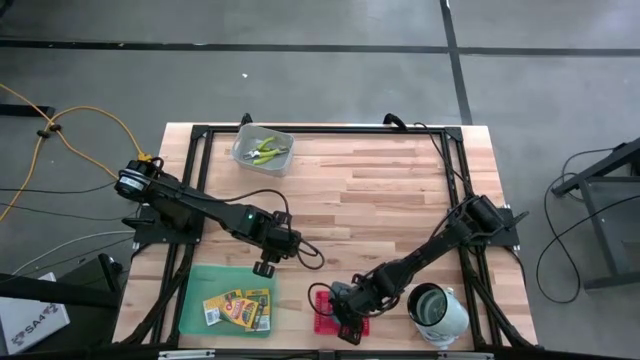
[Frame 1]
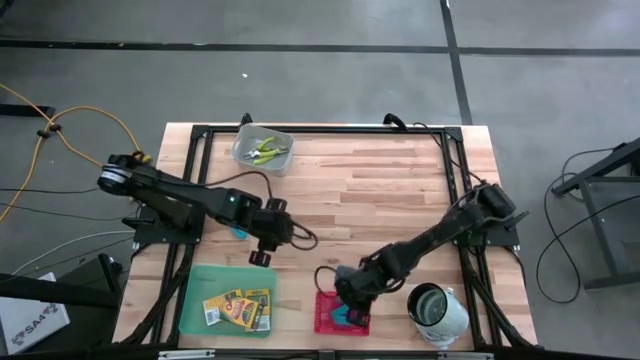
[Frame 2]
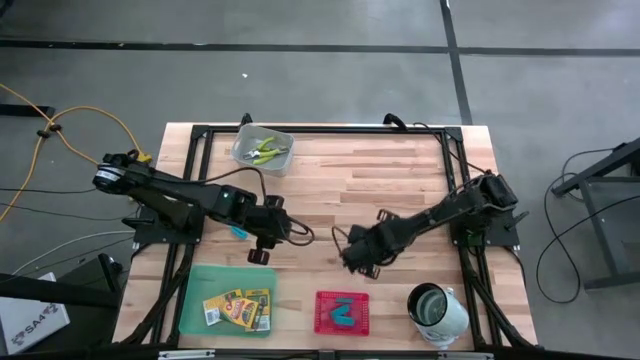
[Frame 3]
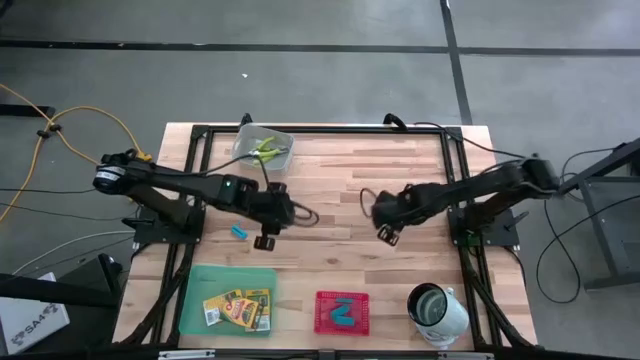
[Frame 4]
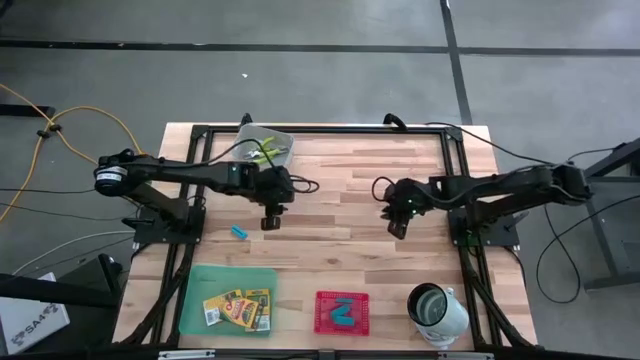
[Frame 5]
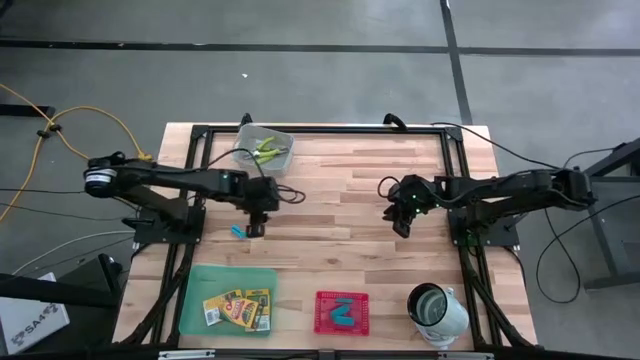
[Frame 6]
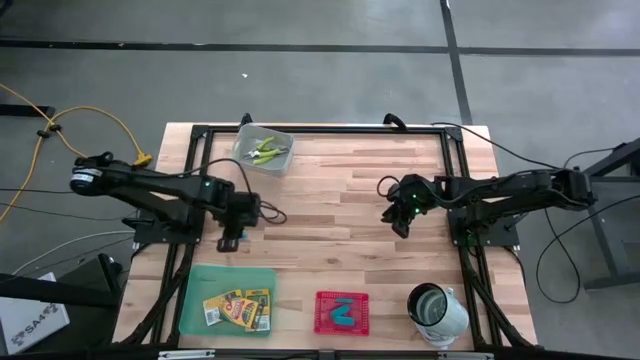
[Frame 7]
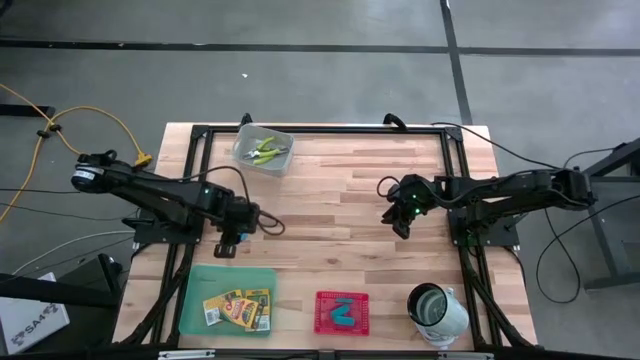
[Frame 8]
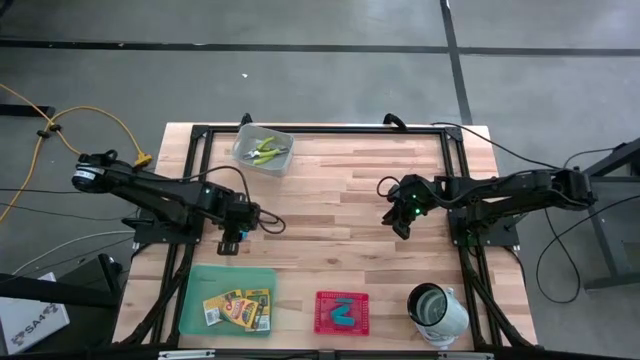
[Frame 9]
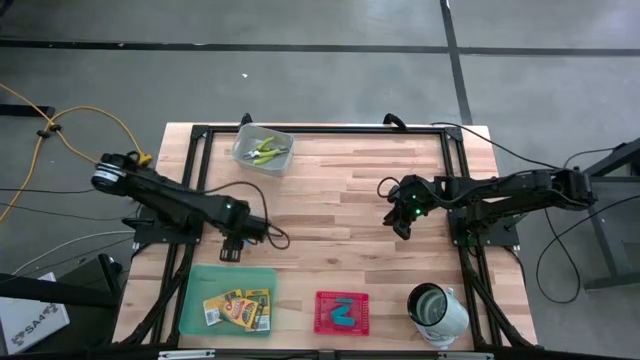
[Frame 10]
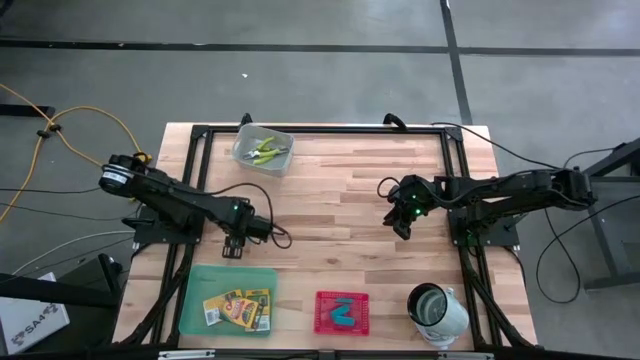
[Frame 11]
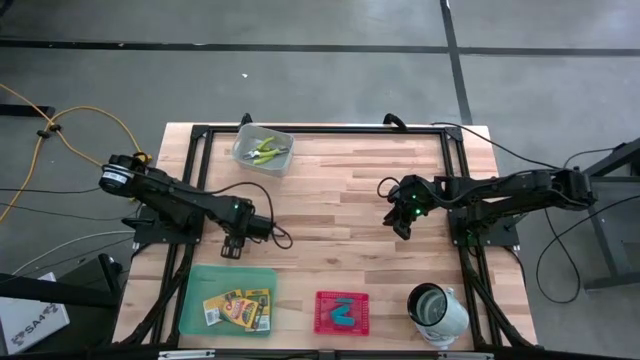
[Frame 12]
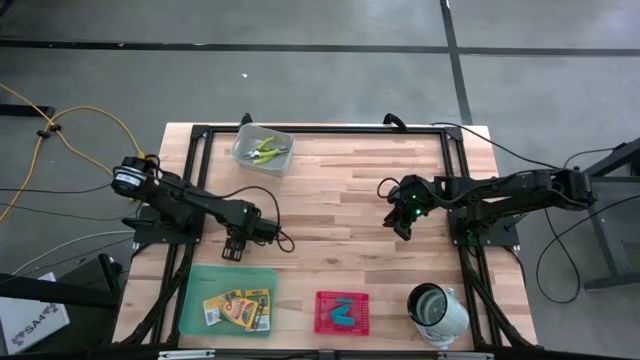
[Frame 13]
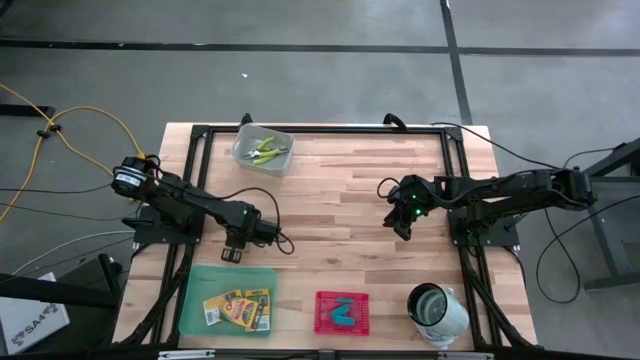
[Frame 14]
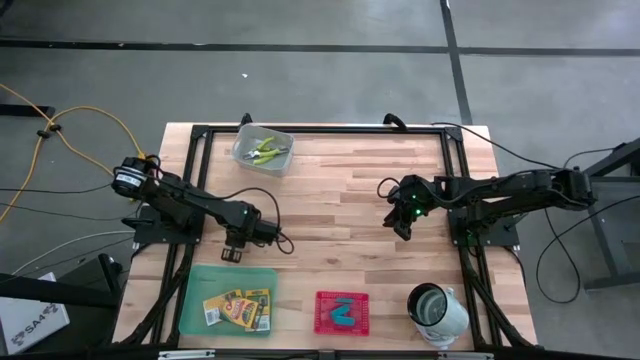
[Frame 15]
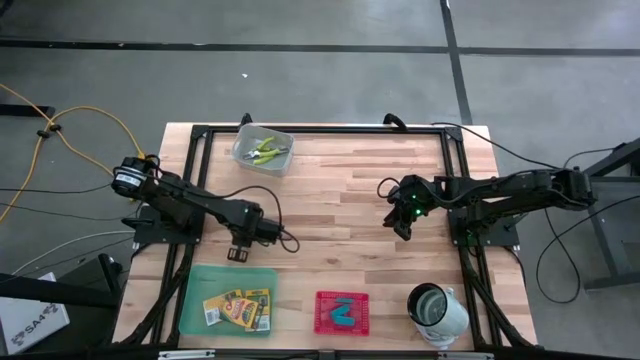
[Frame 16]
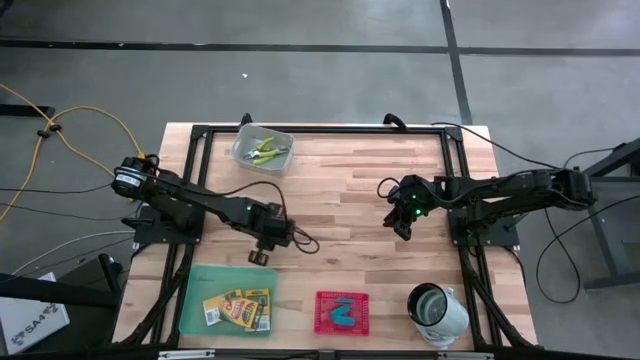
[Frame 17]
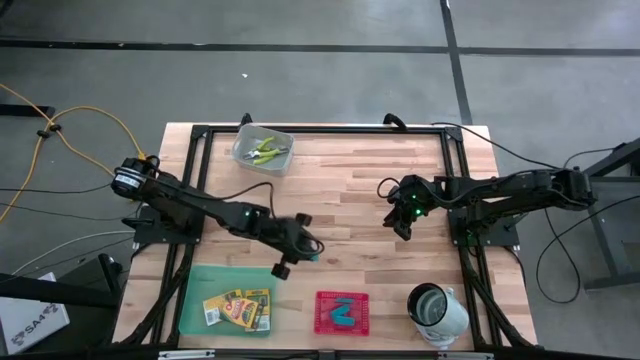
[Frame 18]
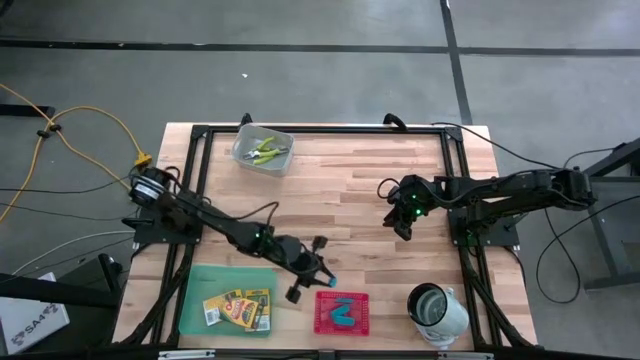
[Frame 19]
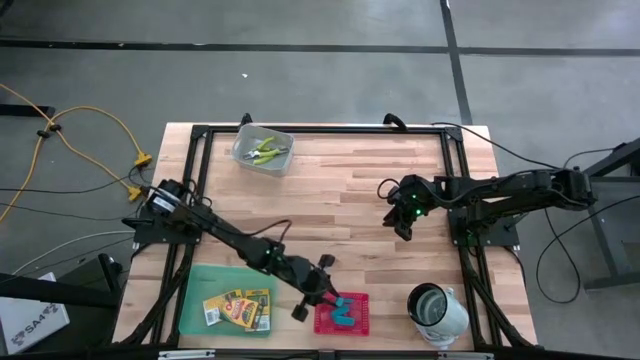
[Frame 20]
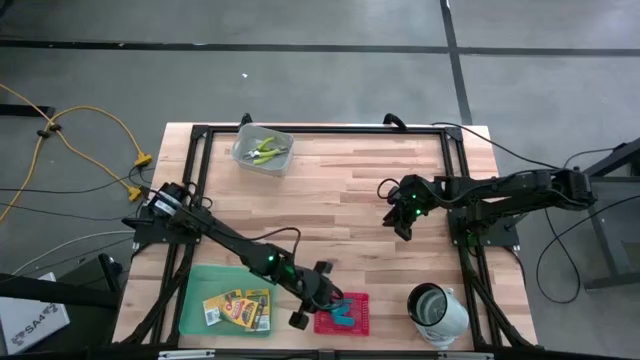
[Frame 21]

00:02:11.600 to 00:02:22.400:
Task: Pick & Place School Supplies
Put the blue eraser into the red bin

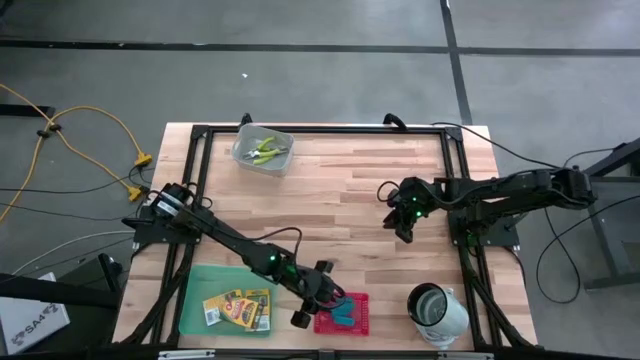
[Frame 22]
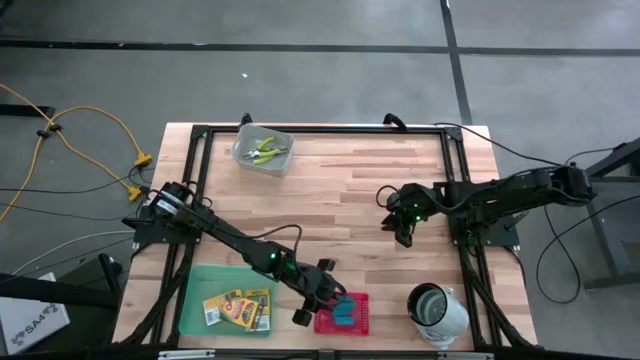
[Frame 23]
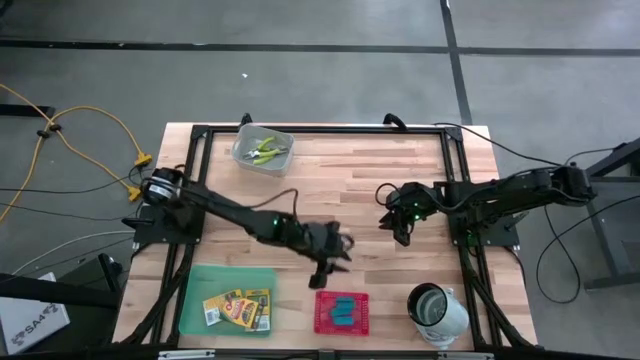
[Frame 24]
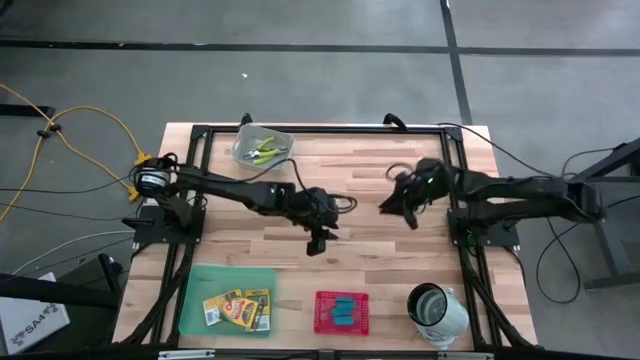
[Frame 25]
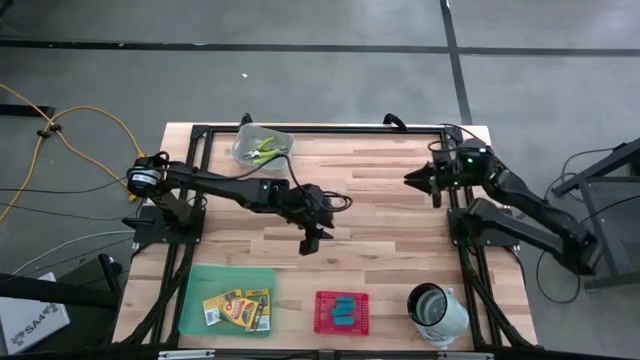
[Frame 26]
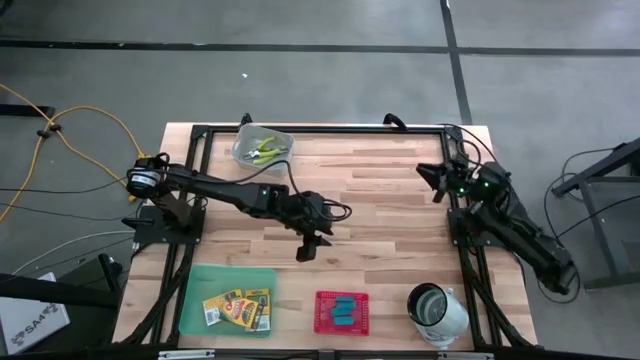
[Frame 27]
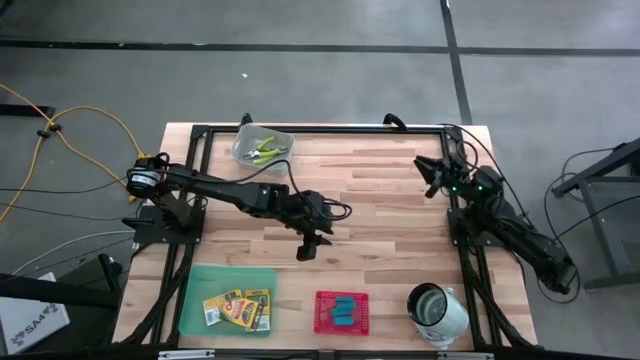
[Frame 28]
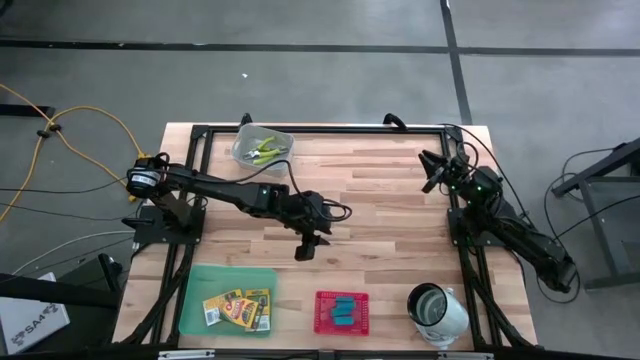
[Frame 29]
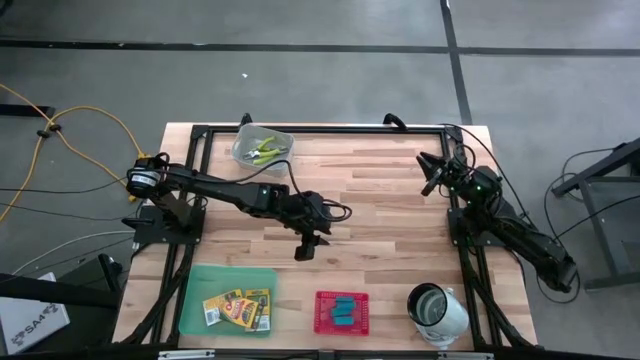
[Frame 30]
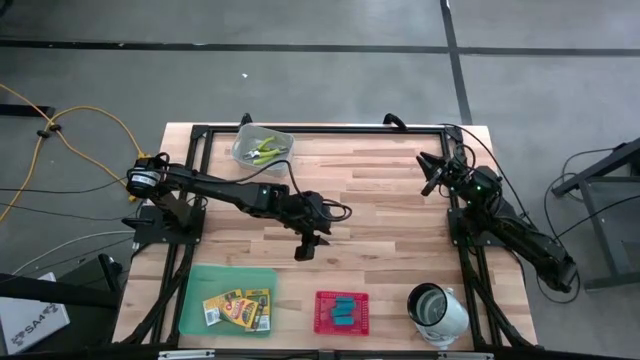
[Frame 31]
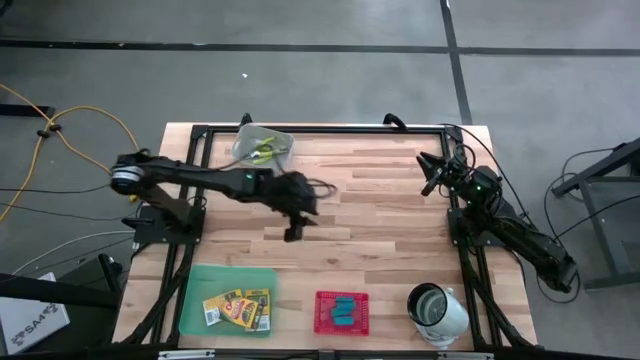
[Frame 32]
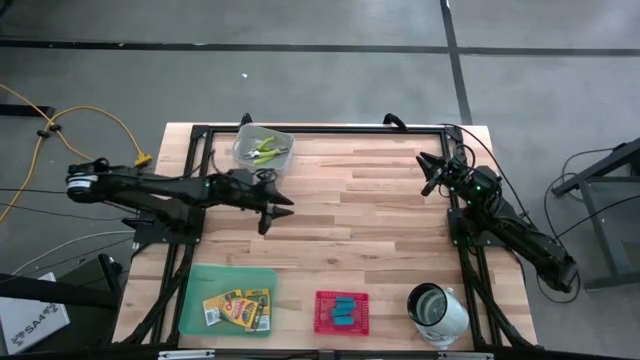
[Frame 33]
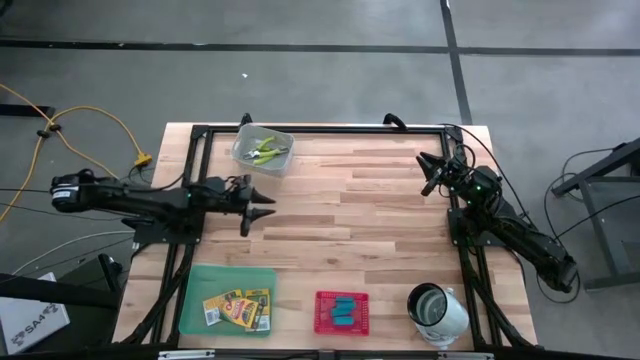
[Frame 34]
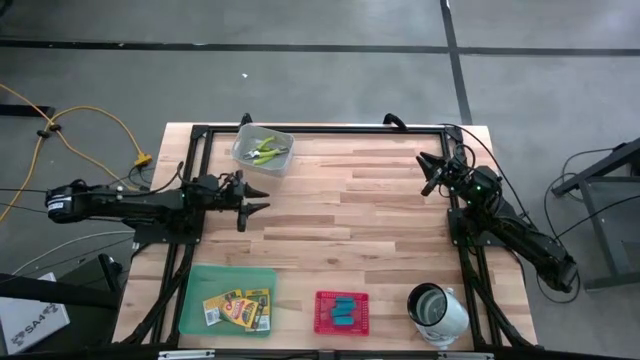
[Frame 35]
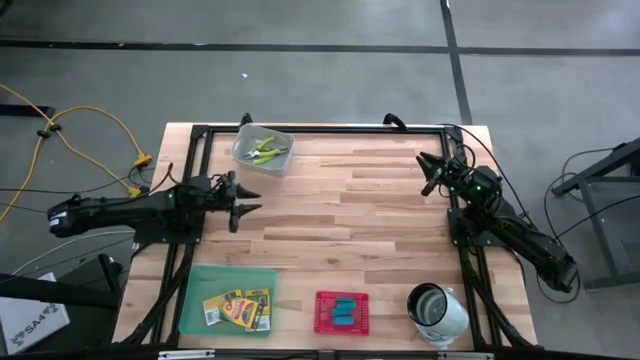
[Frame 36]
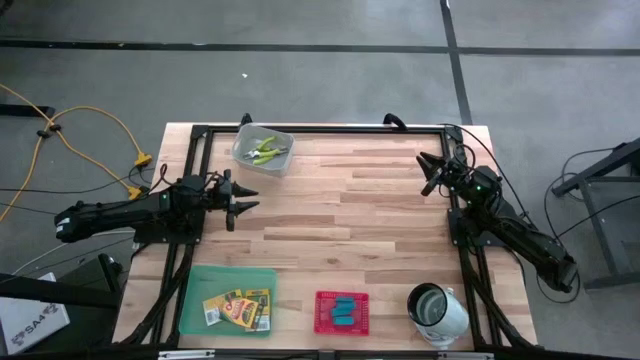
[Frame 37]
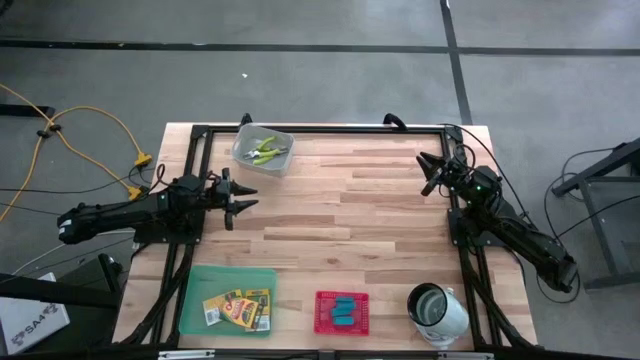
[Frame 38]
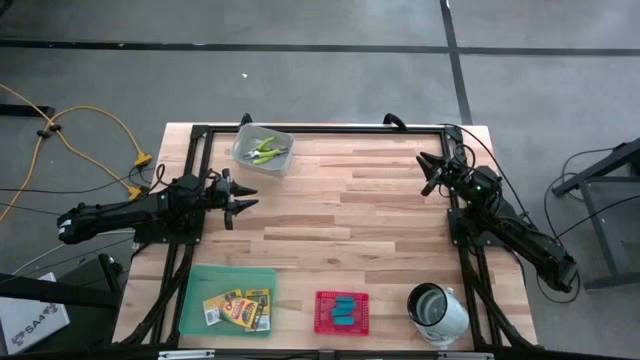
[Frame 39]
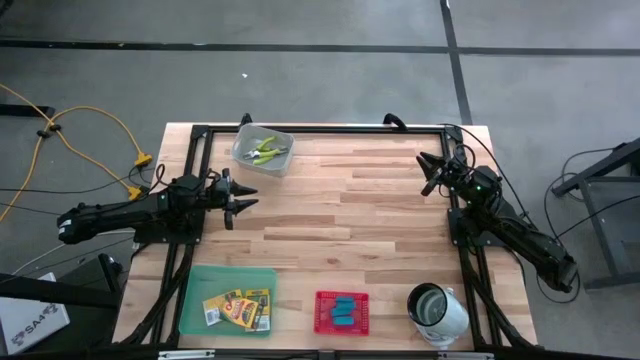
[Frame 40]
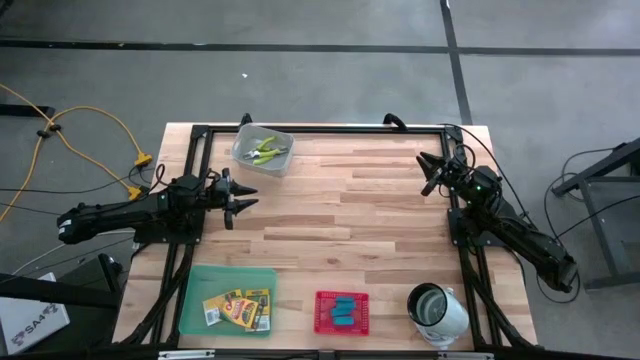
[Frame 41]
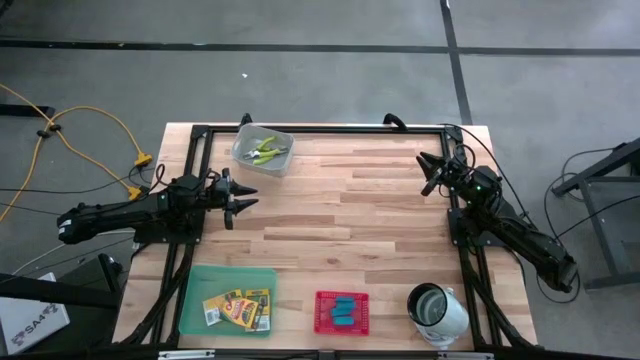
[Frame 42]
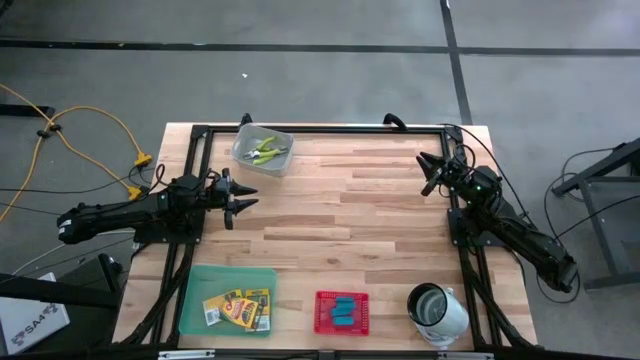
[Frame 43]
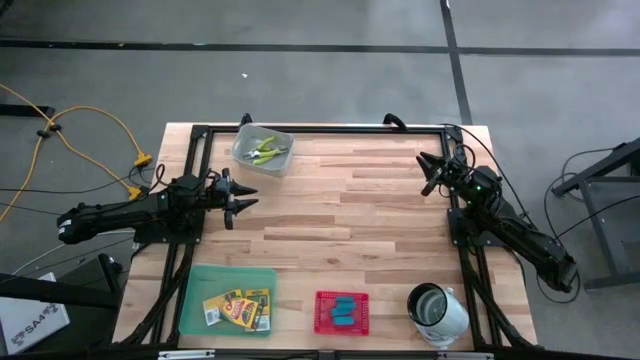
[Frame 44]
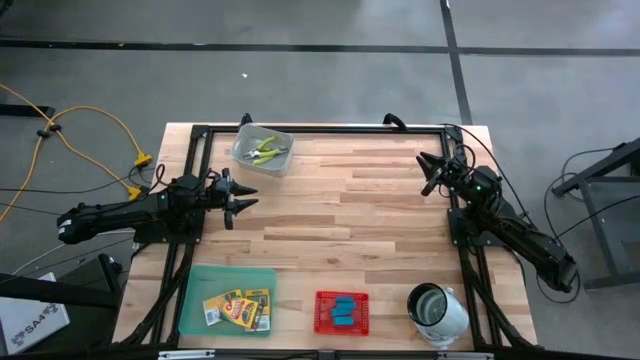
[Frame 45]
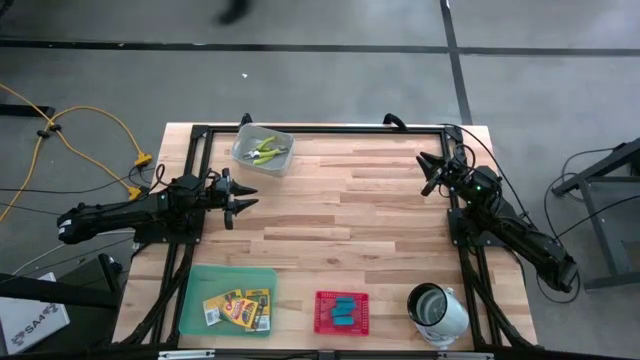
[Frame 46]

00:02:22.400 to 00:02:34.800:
Return to Home Position
